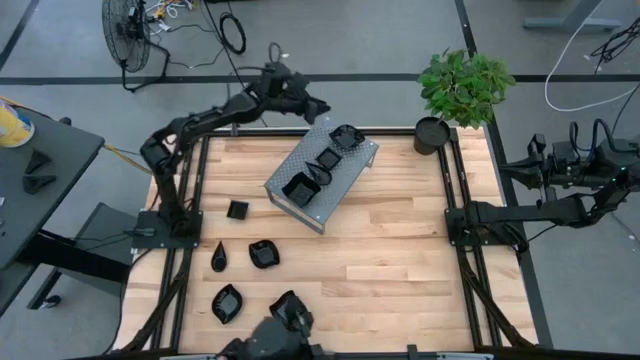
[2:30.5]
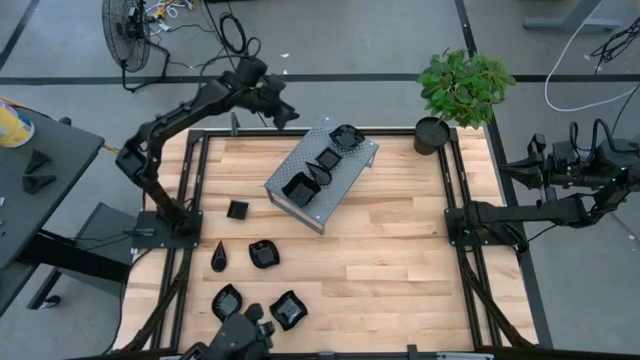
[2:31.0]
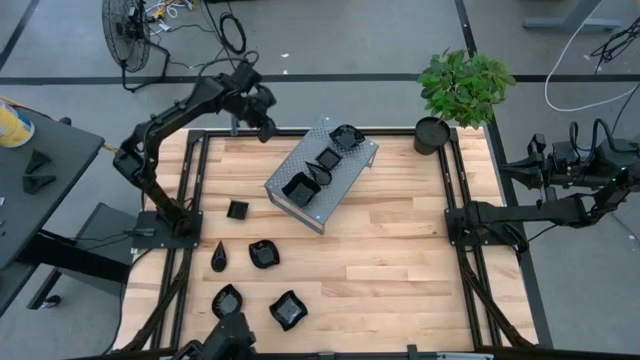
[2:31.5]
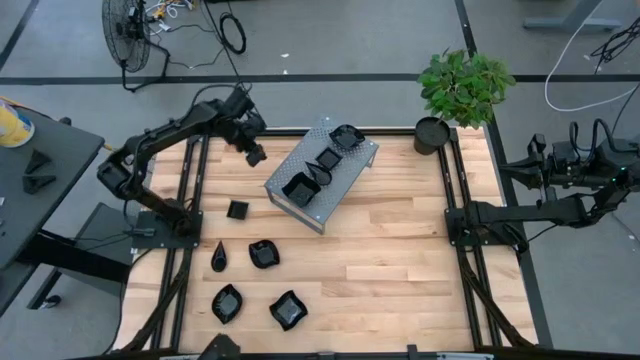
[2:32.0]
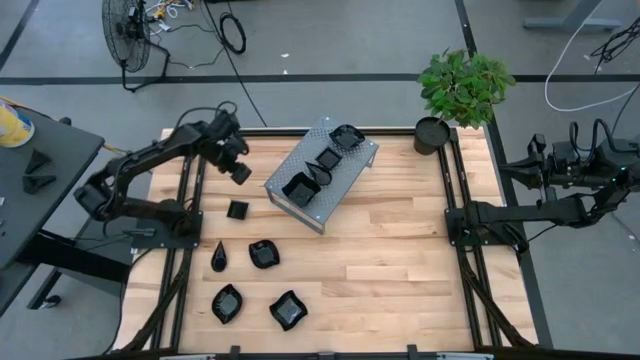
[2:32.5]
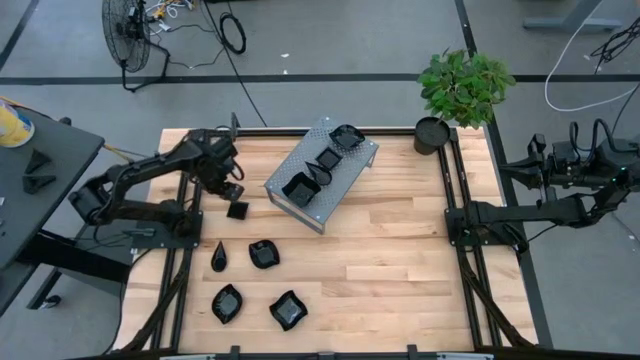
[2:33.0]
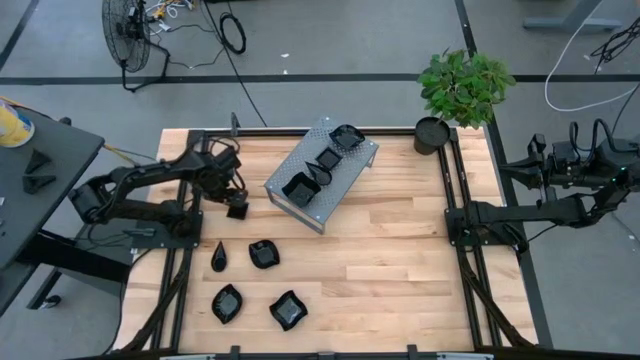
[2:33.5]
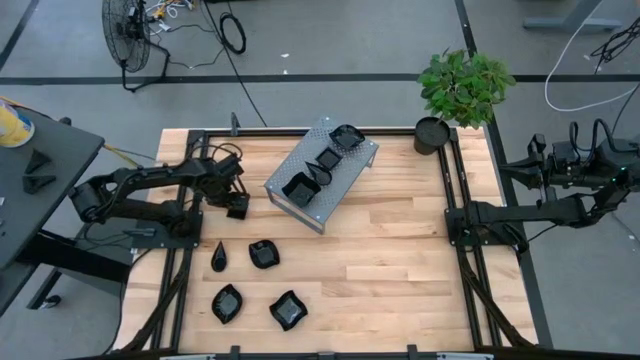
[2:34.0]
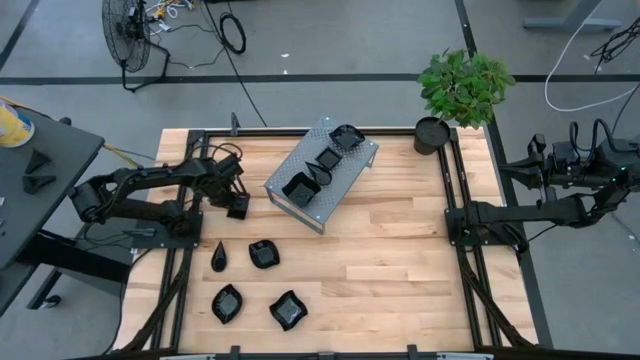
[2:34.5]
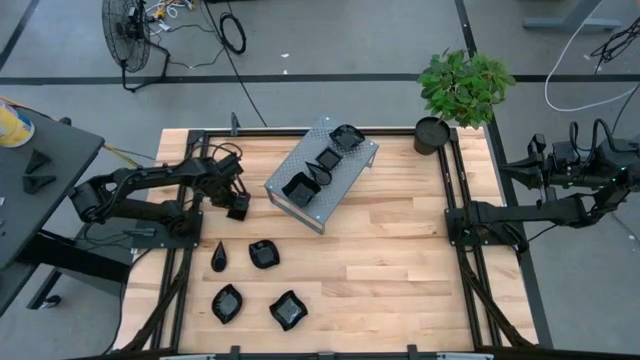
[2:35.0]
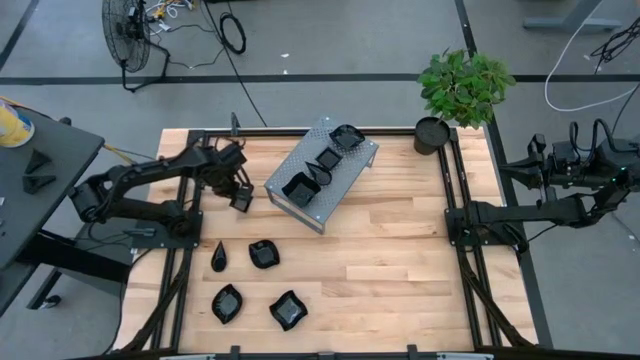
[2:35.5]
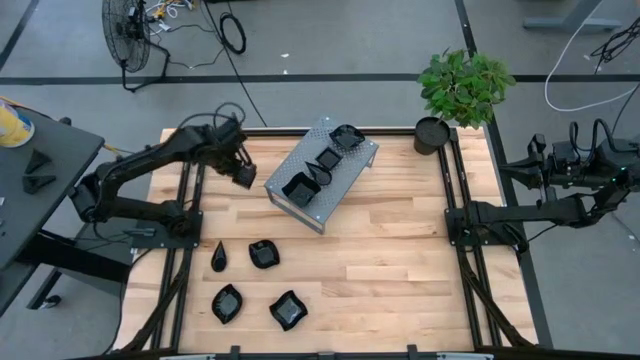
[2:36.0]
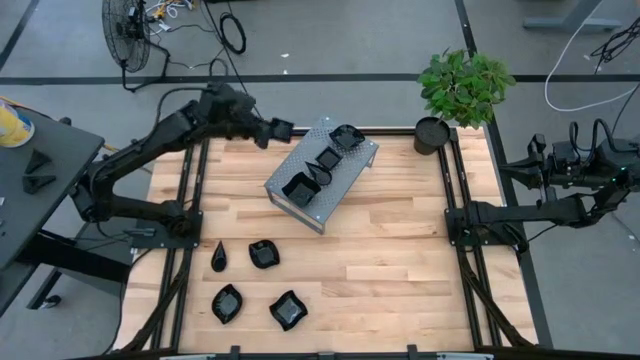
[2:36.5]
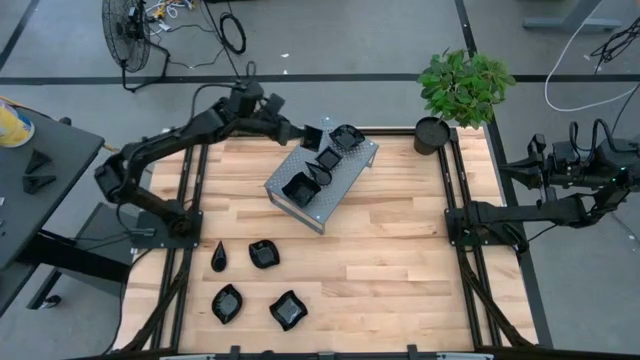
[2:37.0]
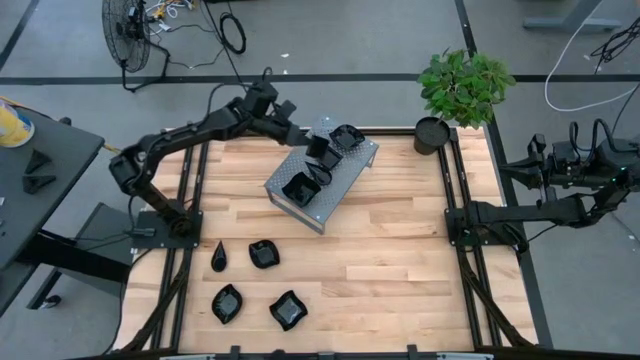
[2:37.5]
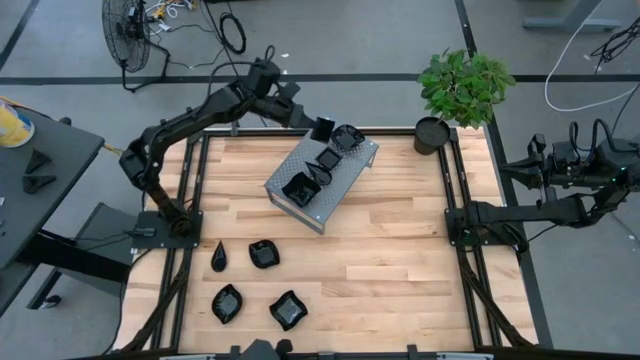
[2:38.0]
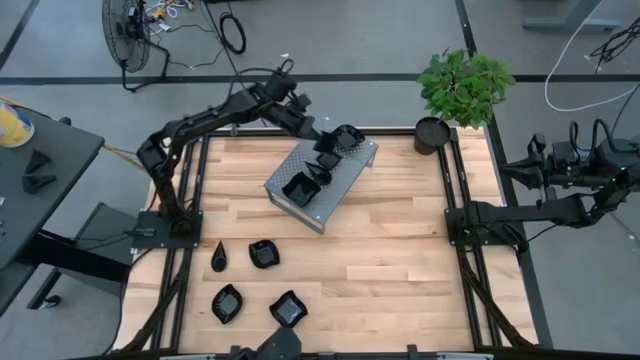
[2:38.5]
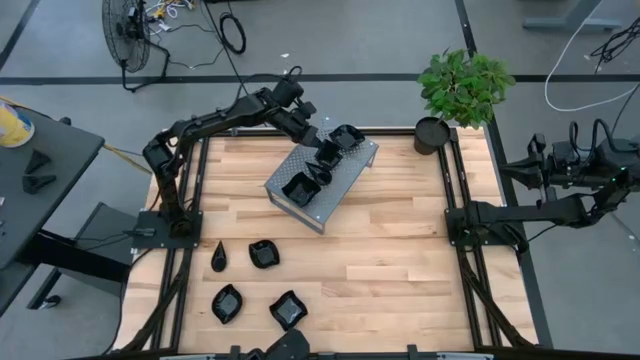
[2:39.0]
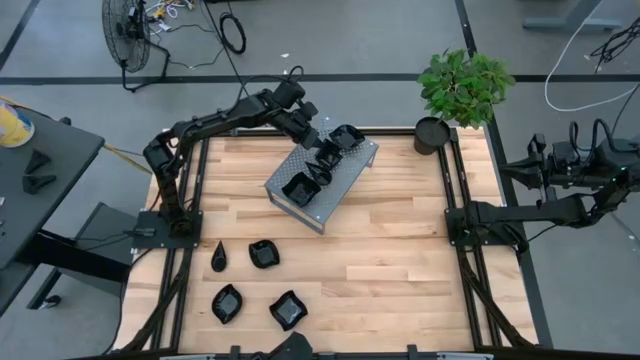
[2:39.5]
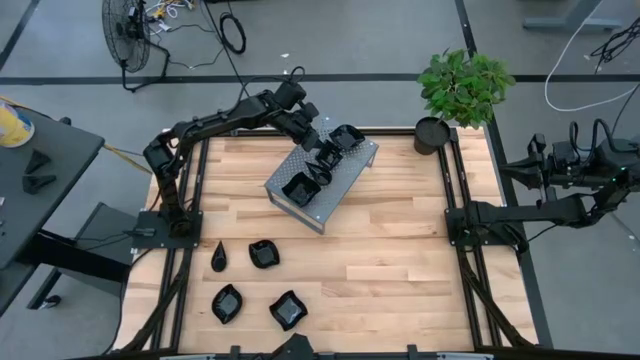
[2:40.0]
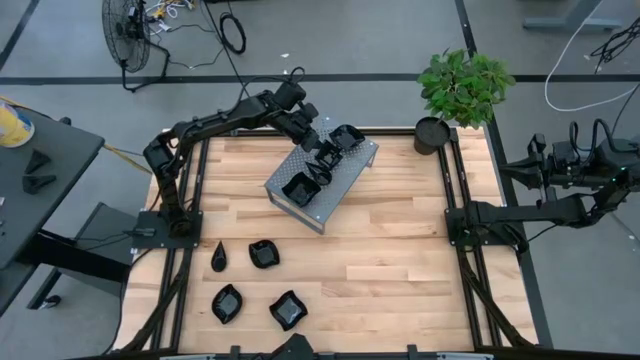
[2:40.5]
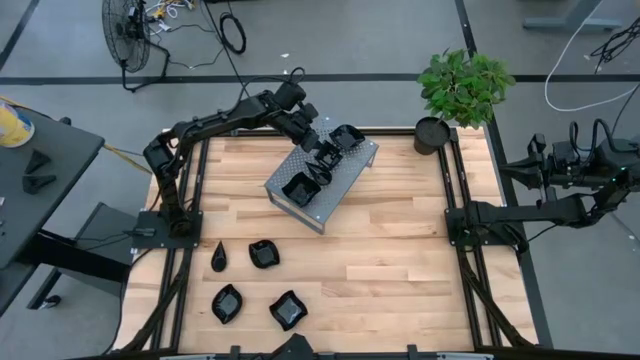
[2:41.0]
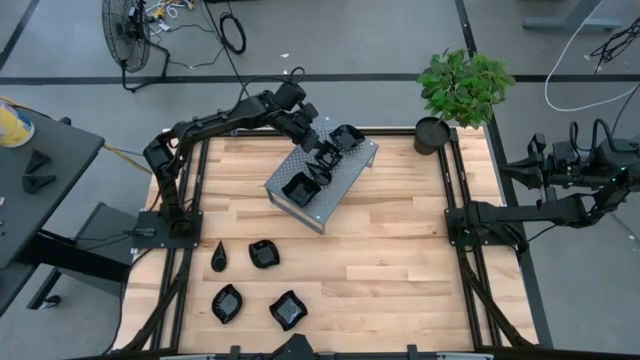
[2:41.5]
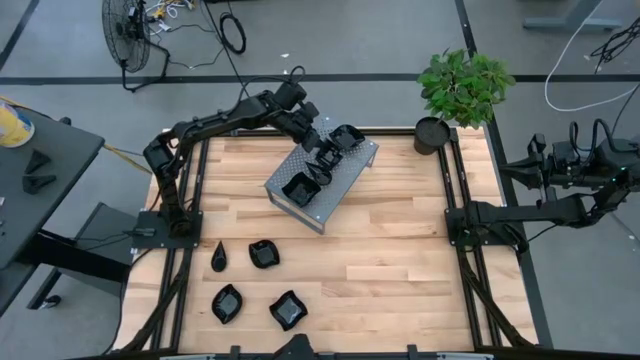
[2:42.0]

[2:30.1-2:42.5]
Task: Pick & Place Mini shaped plates
Stack the black square shaped plate on top of the black square shaped plate on the shelf

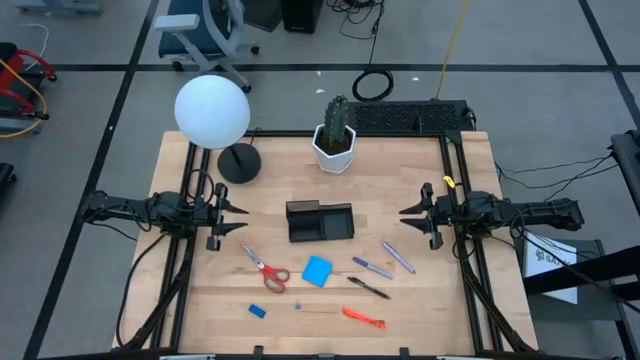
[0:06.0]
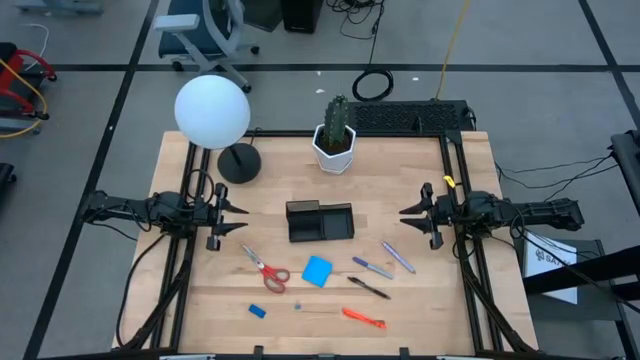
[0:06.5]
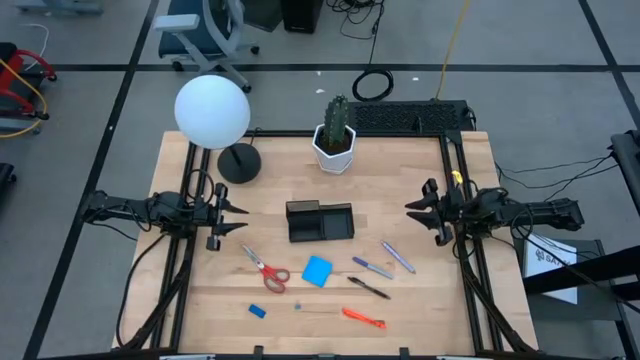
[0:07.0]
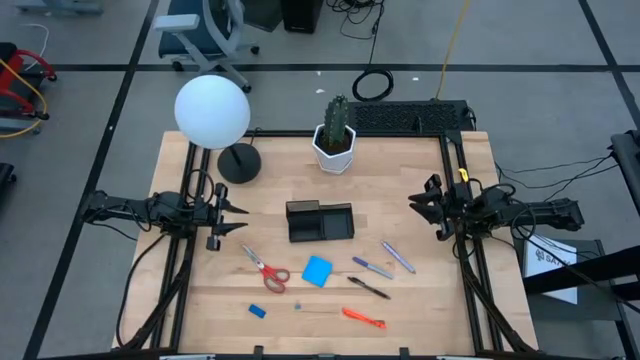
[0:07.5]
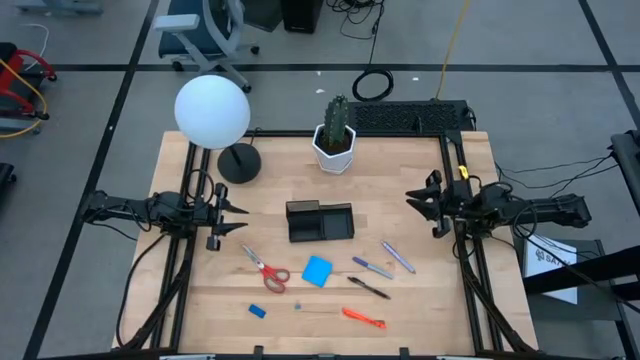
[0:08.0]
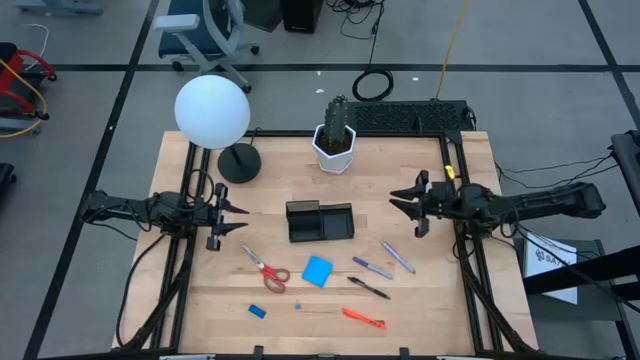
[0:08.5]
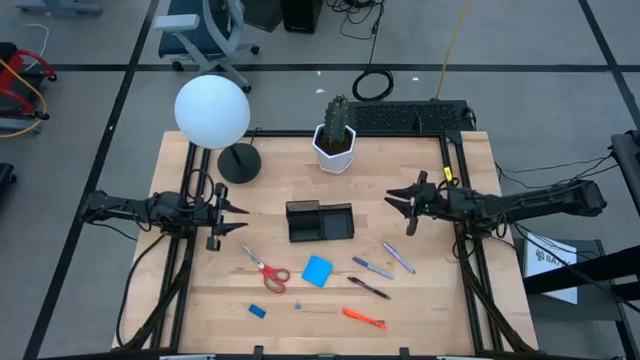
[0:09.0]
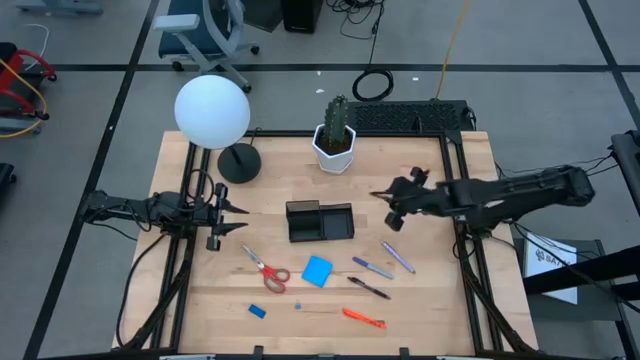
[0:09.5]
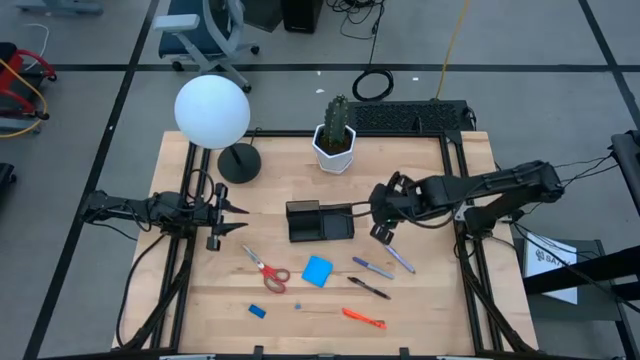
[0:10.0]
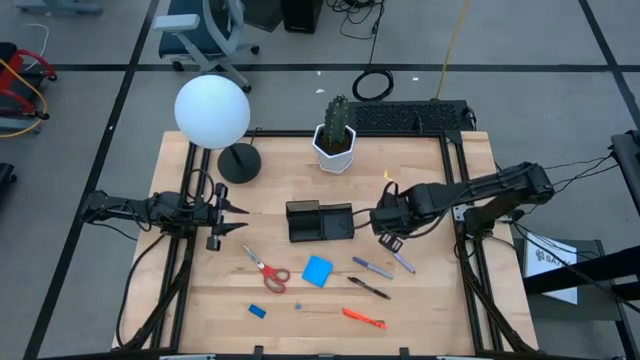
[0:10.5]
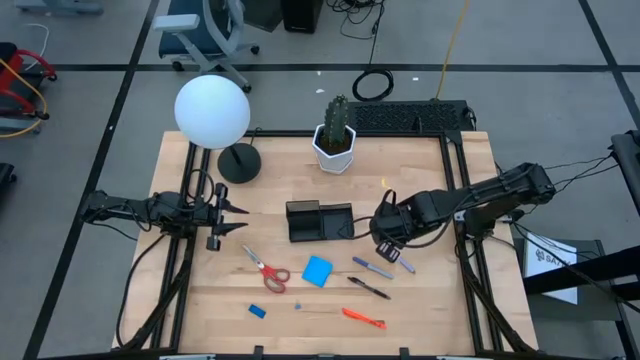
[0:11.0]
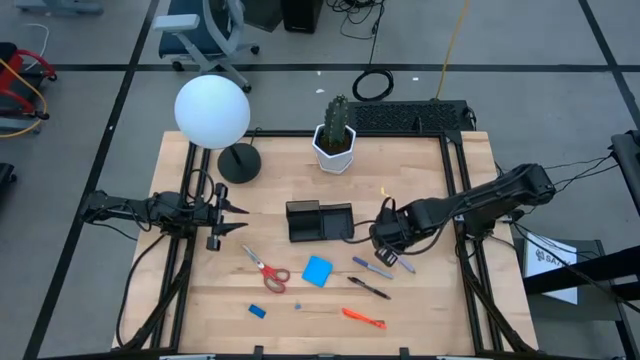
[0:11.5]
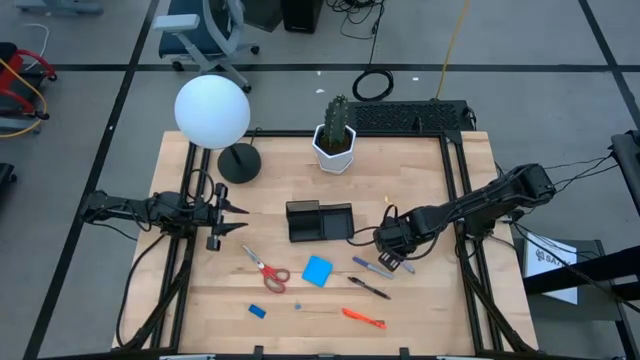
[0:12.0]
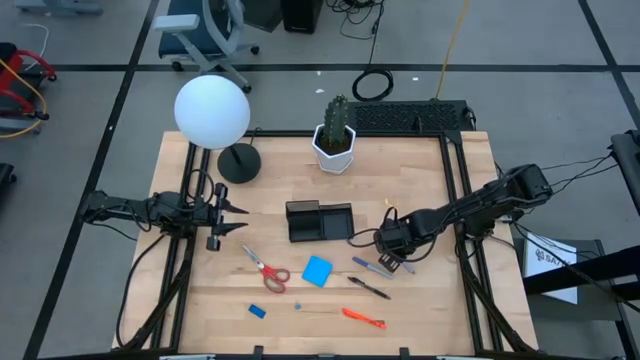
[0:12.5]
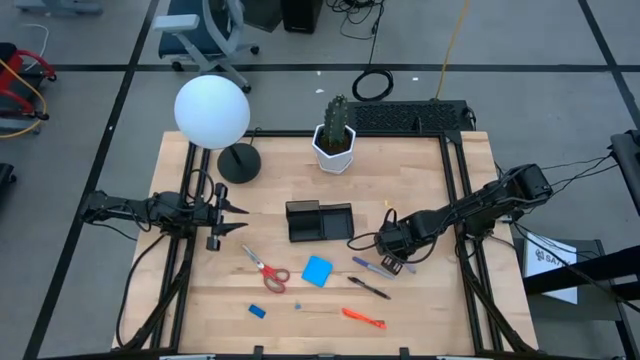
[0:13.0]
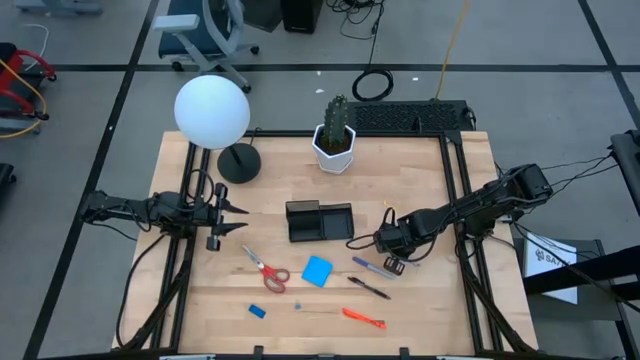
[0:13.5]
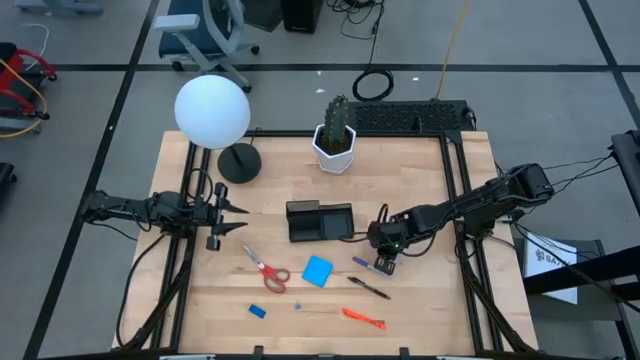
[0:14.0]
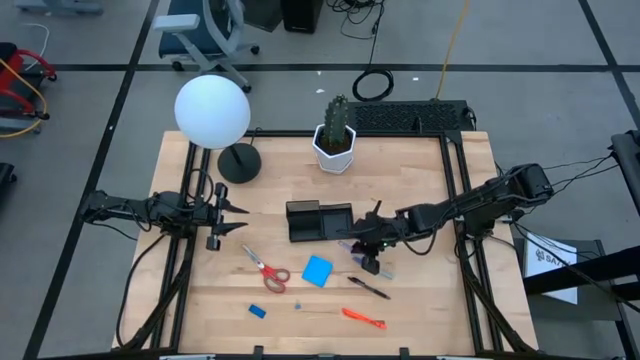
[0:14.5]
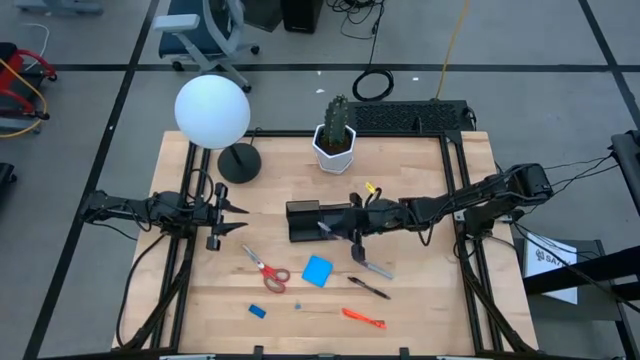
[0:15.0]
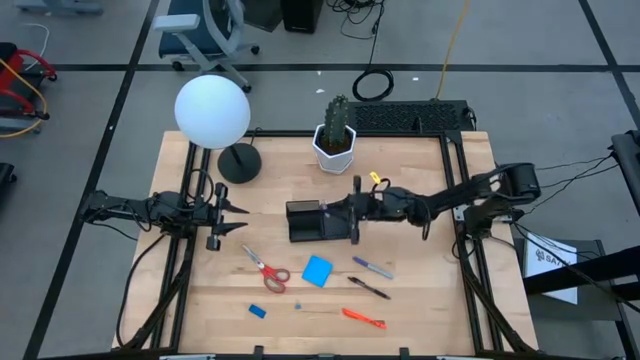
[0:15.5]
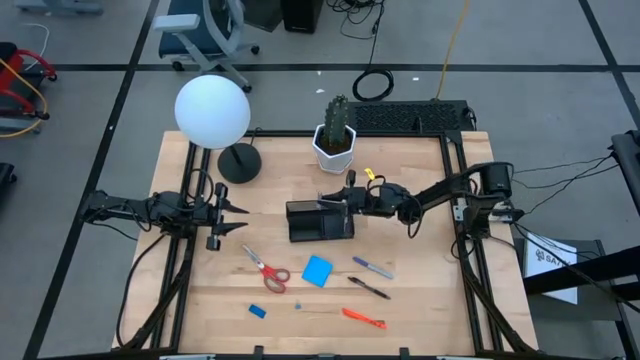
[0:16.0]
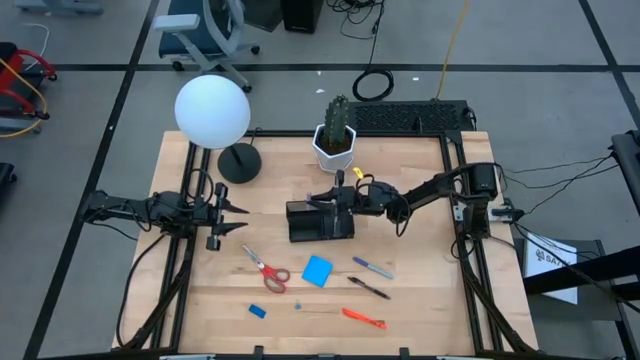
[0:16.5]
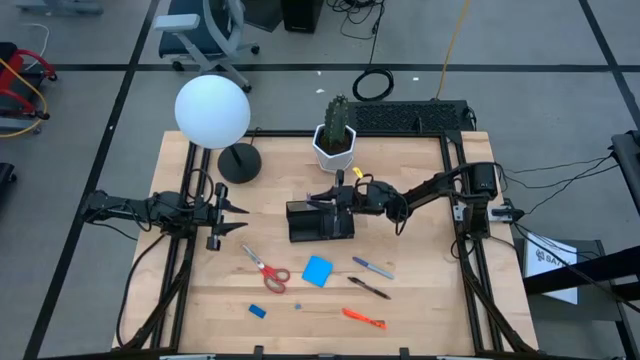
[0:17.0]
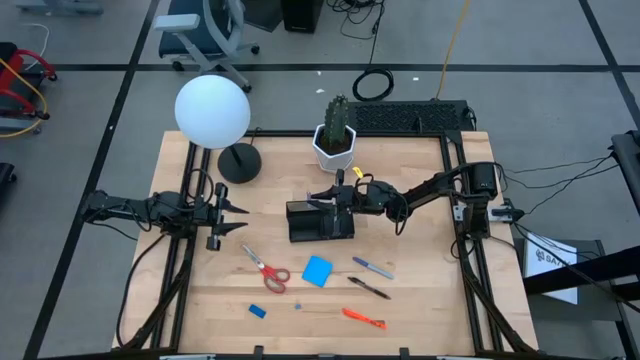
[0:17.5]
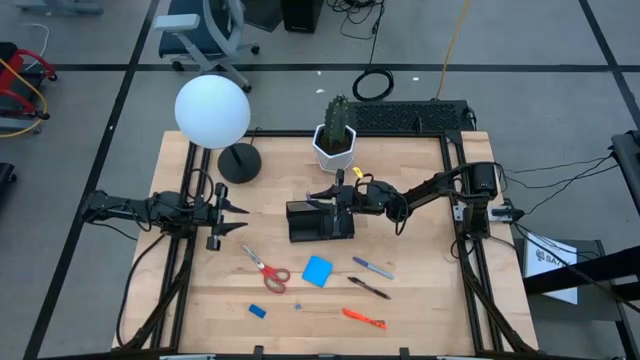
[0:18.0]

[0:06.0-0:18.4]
Task: Pick and place office supplies into organizer
Put the white pen into the black desk organizer
